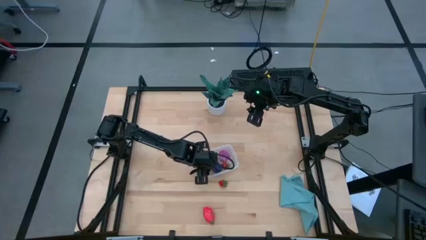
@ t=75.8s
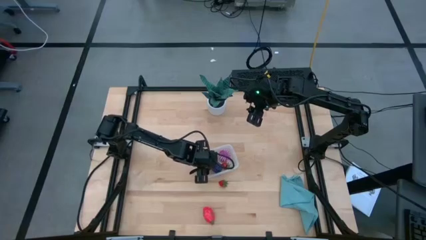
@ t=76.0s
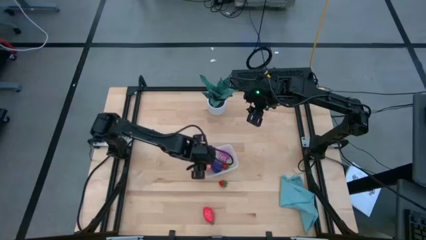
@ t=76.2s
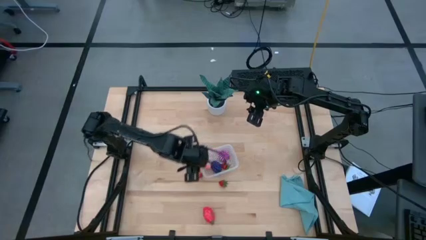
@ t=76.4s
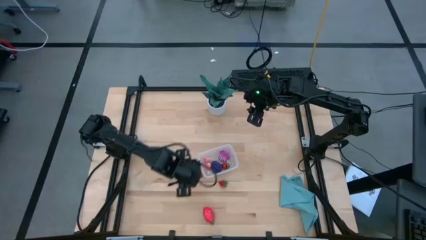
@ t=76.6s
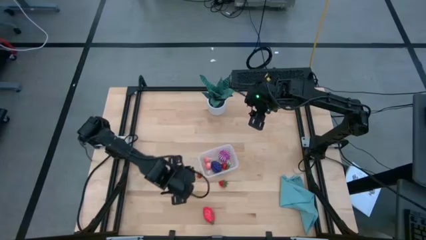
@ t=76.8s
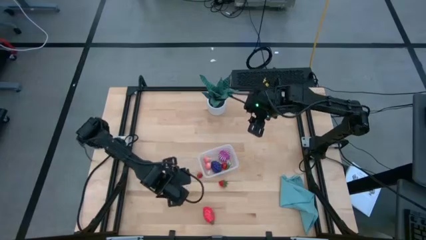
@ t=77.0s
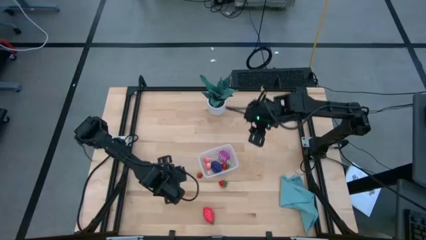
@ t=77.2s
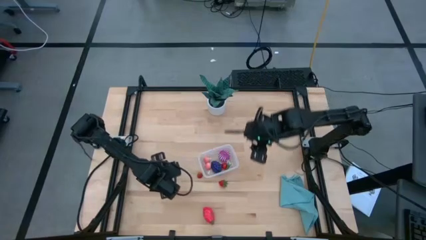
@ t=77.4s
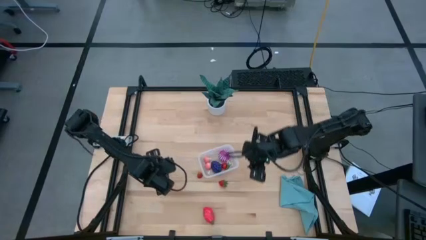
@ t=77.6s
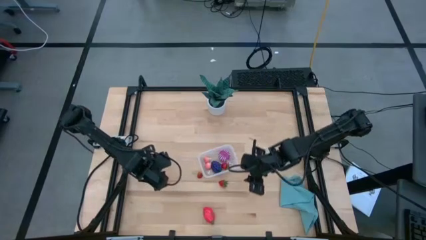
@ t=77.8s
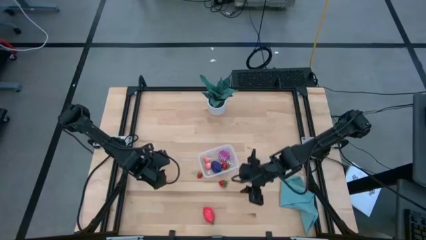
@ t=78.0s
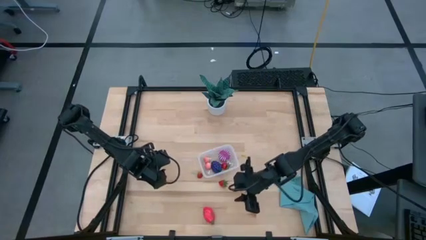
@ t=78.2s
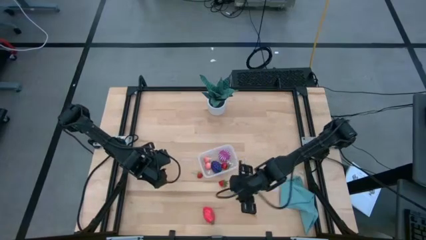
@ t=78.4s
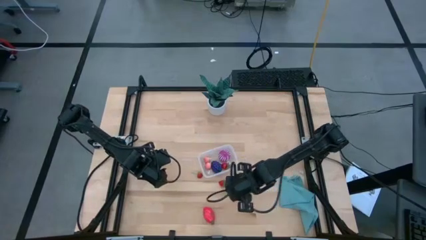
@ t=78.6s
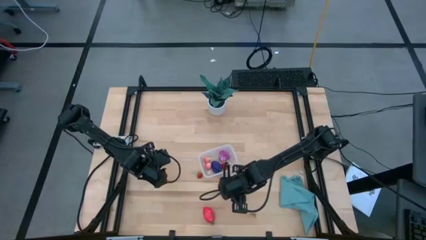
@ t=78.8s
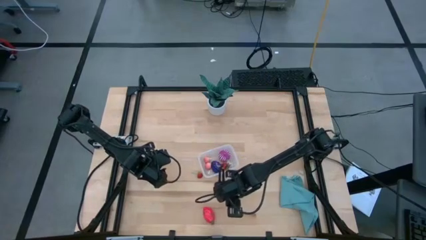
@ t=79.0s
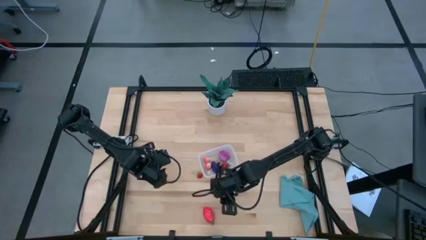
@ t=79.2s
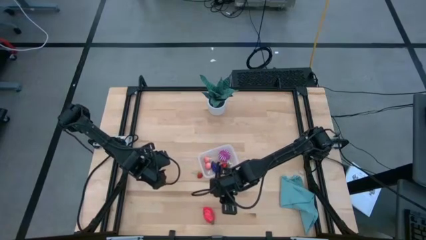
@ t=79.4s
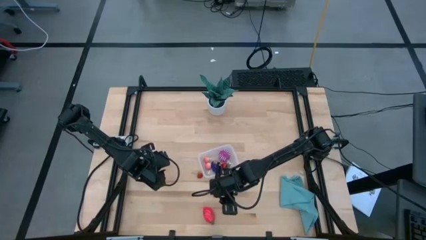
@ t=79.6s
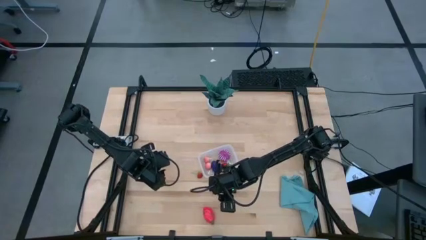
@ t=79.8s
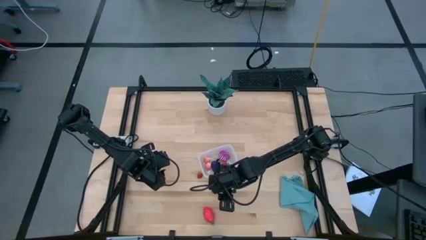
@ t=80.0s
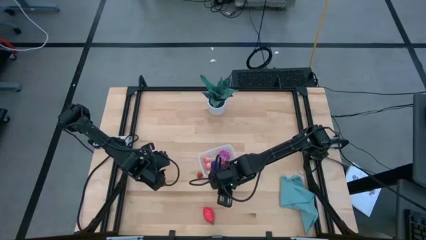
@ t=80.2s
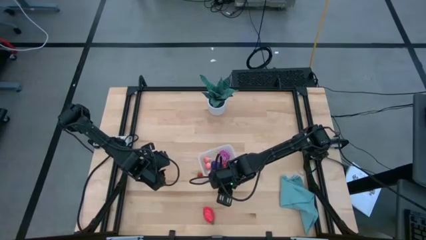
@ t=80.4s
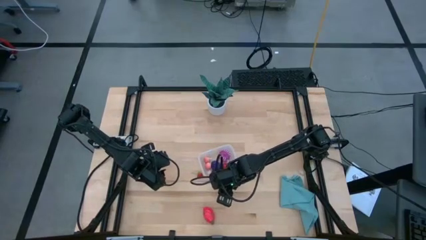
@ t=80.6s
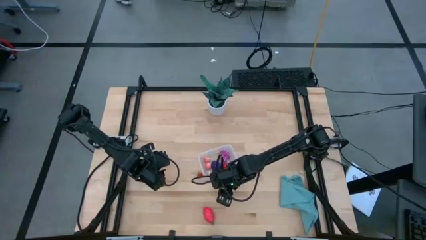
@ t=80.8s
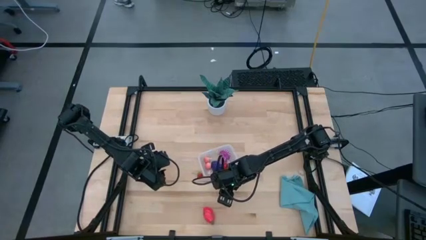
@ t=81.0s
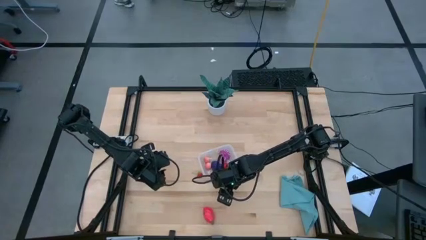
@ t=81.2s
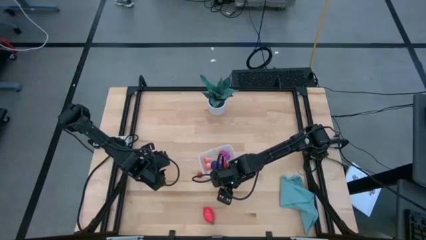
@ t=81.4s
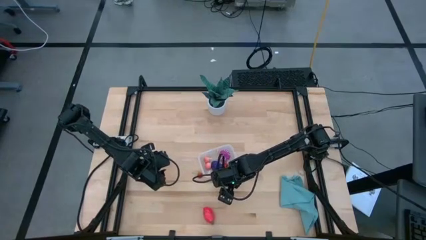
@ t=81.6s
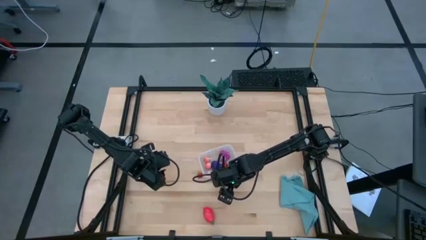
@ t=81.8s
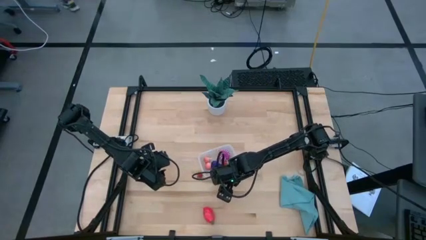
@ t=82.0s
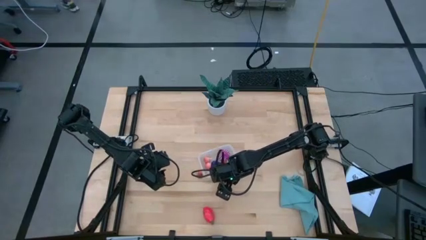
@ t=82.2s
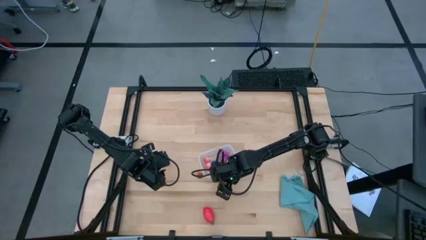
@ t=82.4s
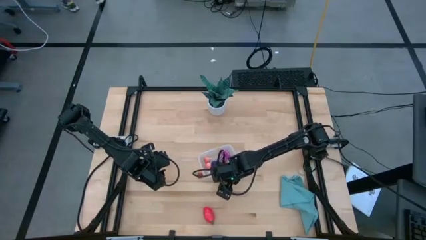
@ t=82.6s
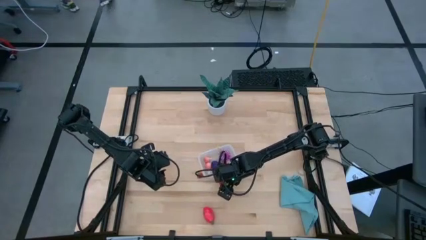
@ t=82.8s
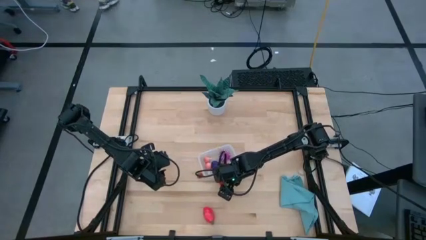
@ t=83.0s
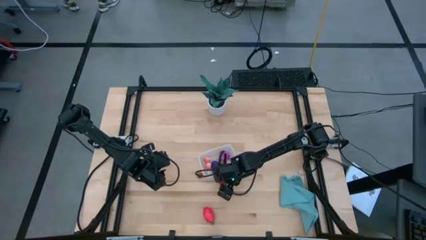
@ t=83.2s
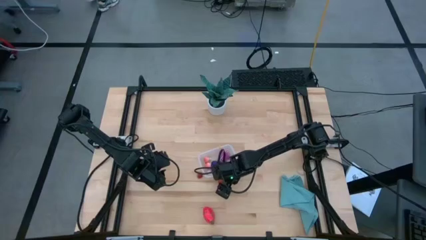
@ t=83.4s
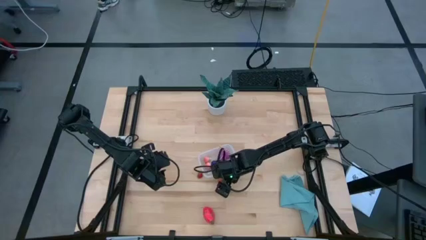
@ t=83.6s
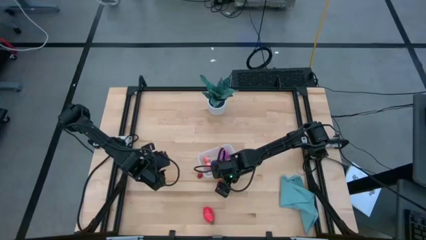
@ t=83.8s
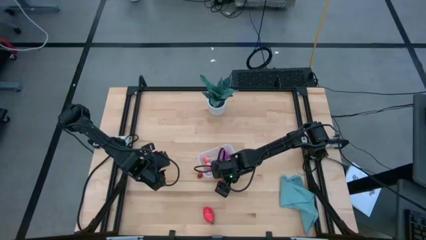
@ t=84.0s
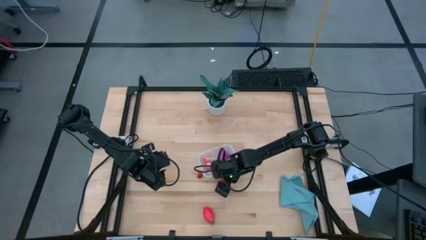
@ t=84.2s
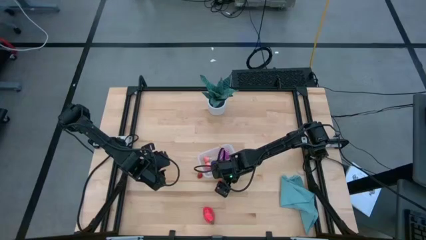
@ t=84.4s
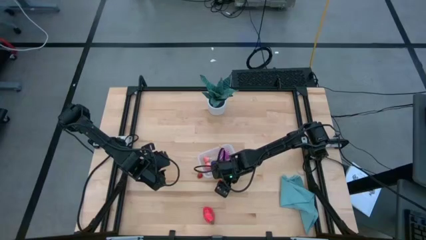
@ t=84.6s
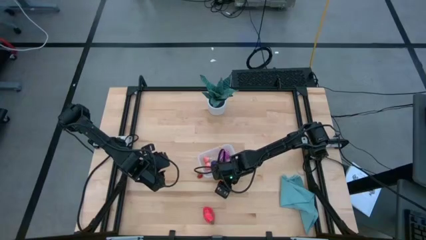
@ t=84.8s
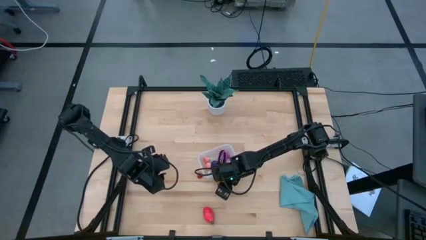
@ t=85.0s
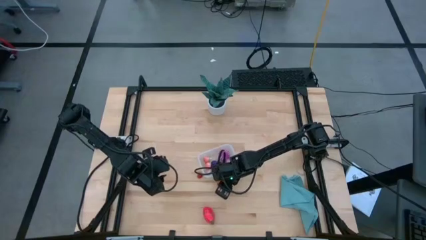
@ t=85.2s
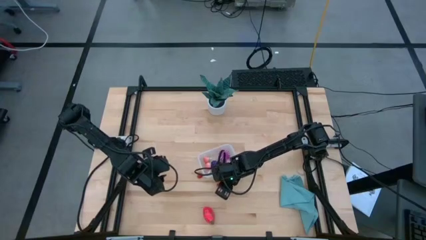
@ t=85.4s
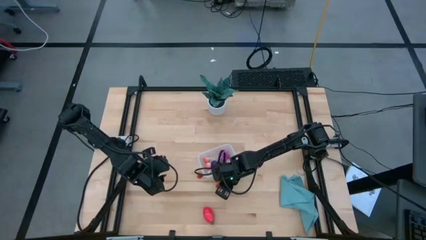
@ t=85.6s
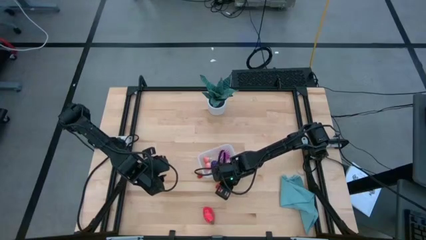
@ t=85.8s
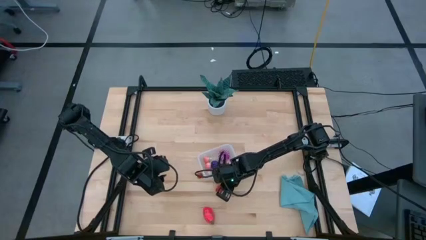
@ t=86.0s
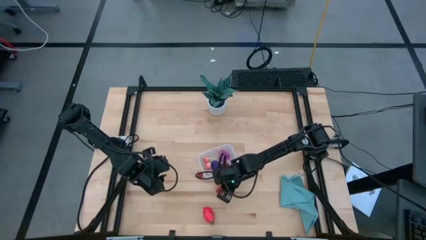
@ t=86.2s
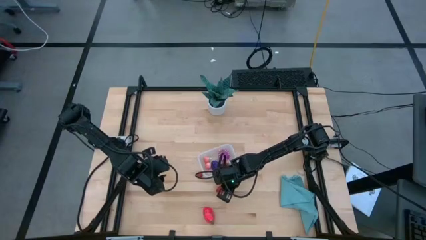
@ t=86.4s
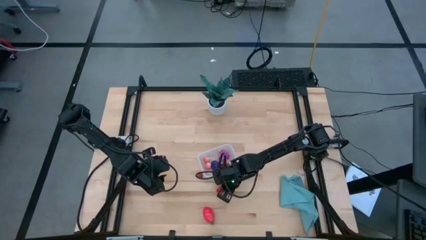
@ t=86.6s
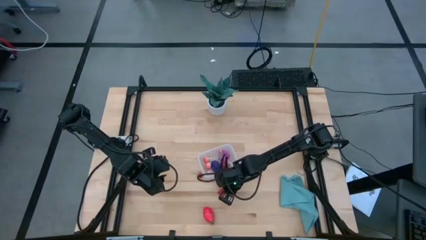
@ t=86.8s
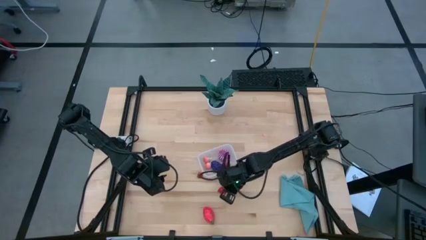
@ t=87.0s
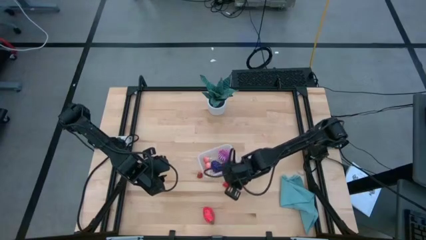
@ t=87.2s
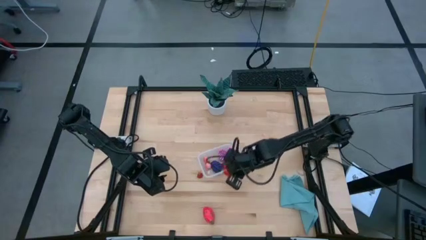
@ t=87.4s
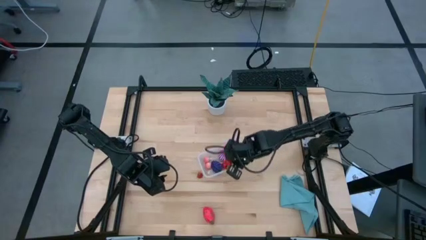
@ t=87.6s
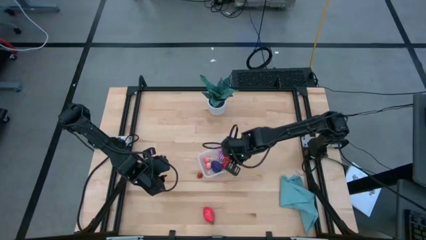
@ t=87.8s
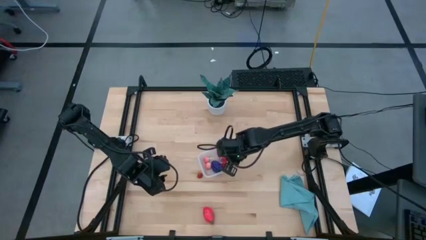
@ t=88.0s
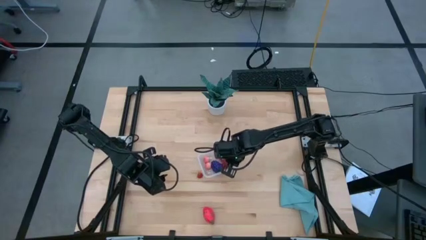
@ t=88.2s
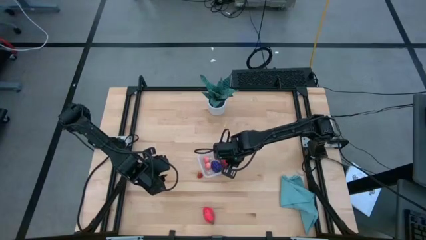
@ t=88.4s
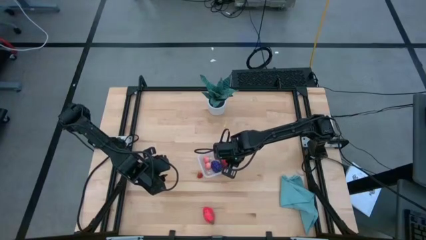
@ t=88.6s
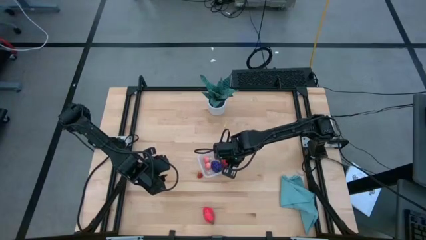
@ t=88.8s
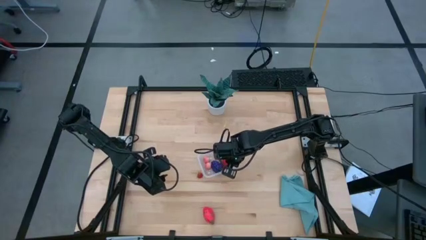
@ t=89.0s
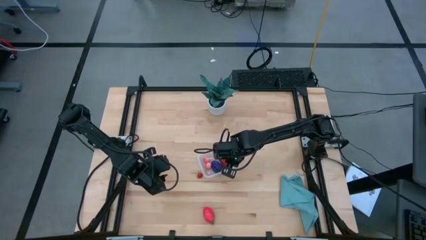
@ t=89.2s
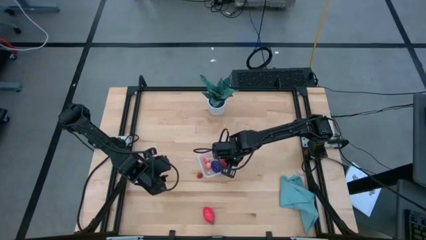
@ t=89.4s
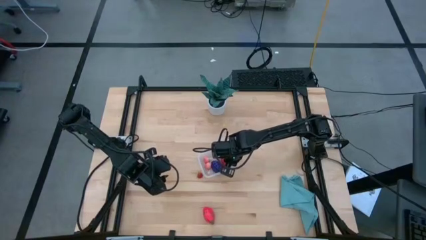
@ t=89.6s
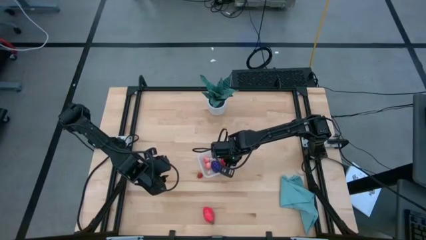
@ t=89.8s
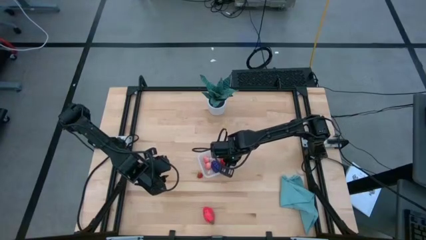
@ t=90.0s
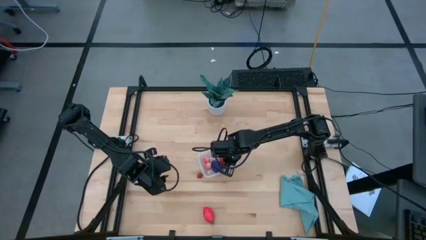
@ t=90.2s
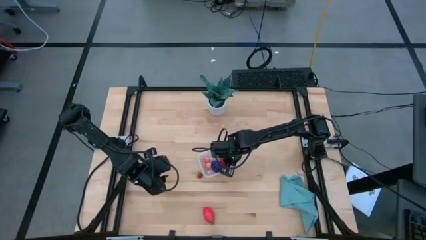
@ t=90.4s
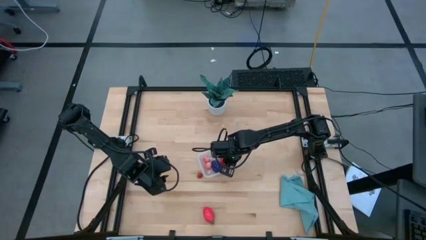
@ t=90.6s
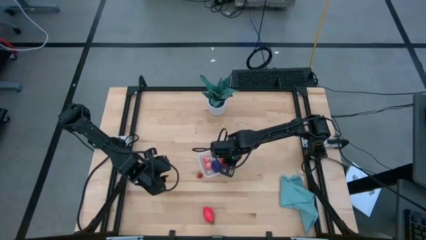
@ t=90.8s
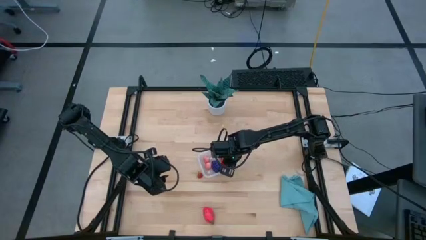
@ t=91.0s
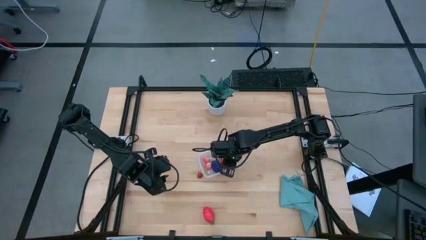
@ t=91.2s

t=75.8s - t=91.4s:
Task: Pick and placing Produce into tupperware
Put the right strawberry into the transparent bin
